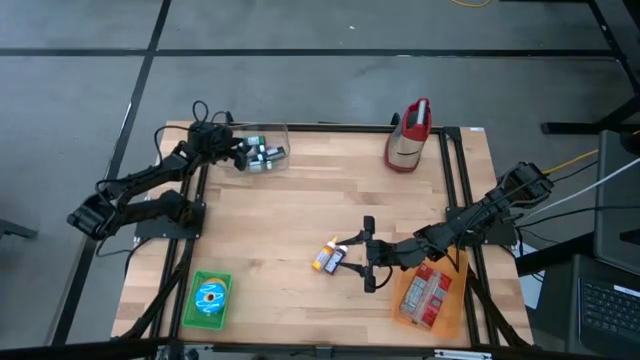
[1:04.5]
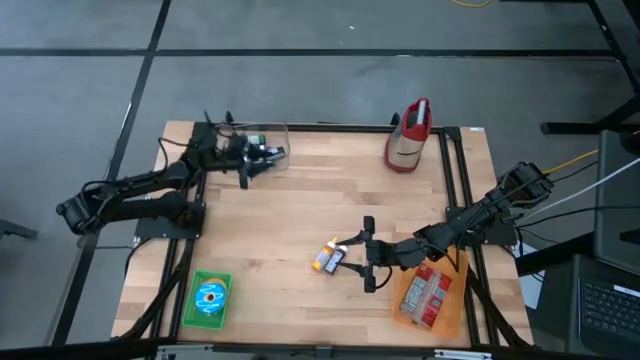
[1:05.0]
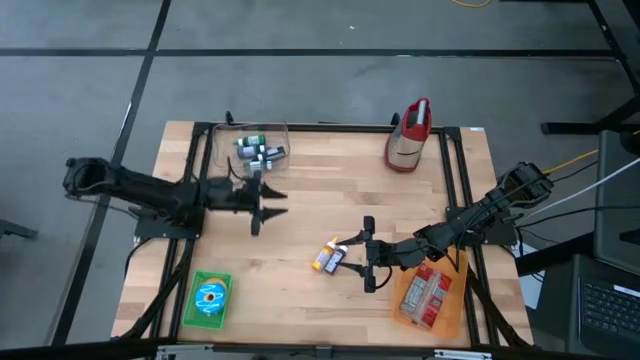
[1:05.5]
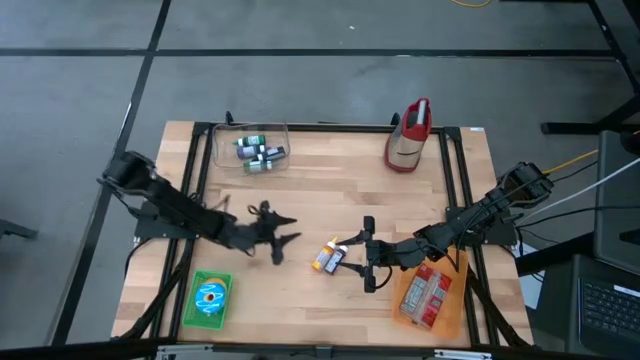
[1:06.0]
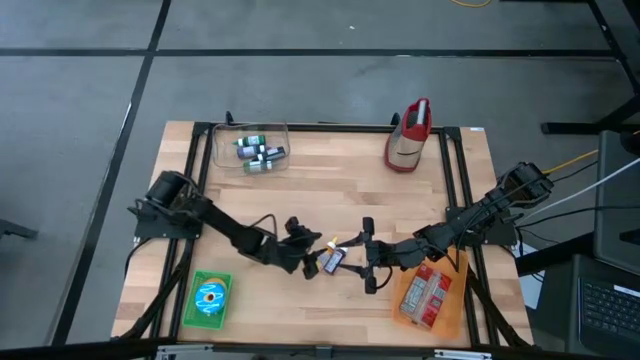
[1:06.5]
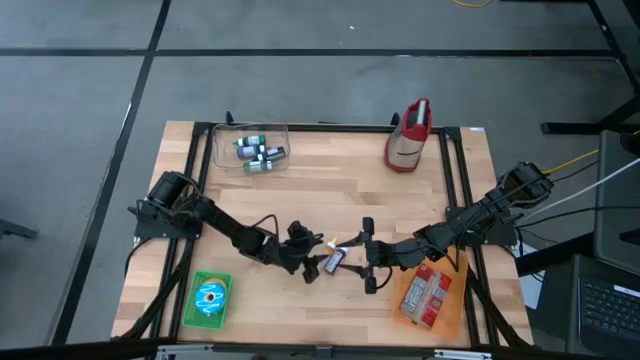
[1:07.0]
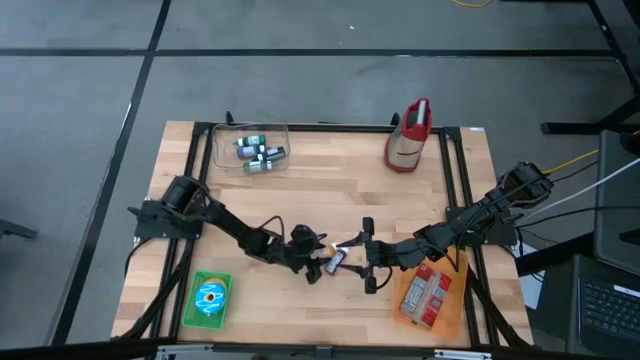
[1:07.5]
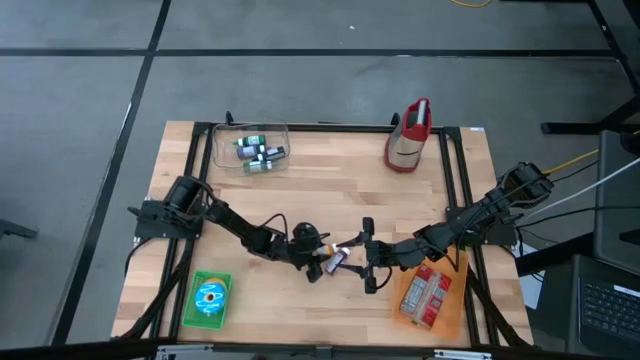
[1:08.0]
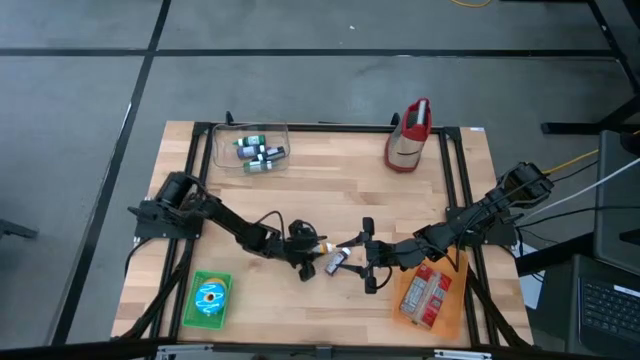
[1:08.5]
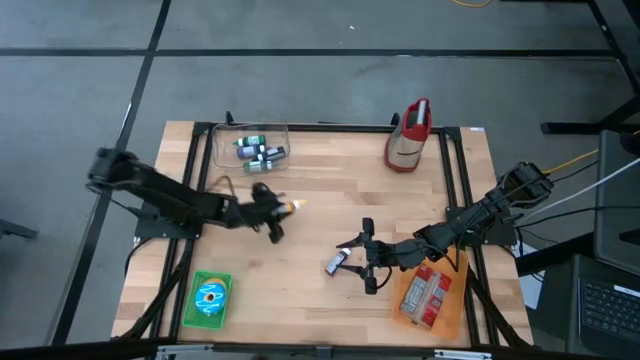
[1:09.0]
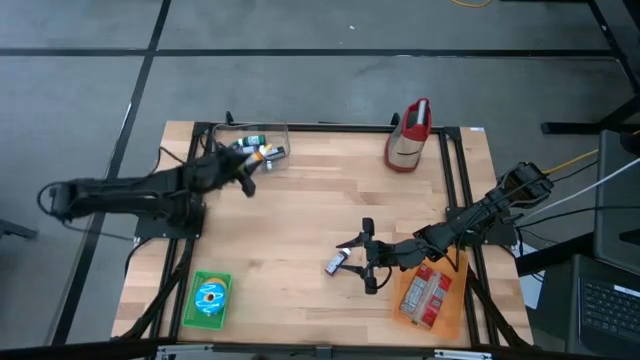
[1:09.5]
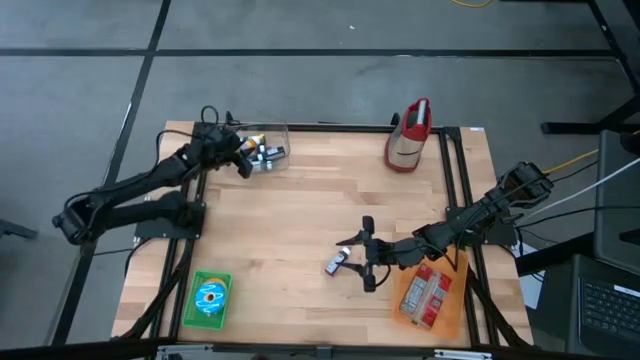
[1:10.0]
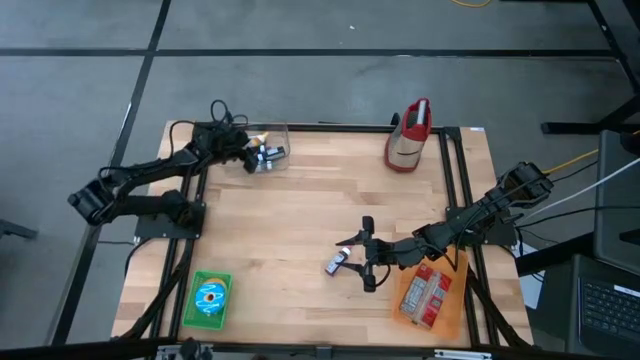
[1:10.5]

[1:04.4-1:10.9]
Put the yellow food coloring bottle into the white transparent bin

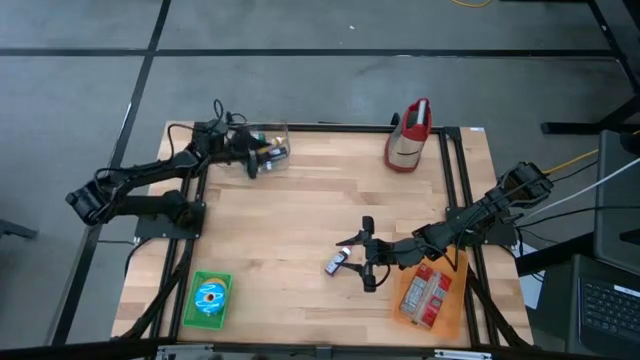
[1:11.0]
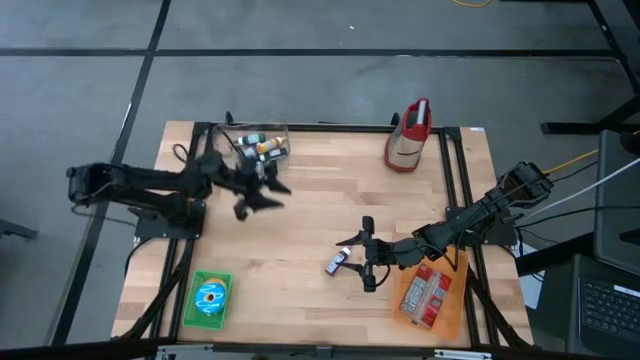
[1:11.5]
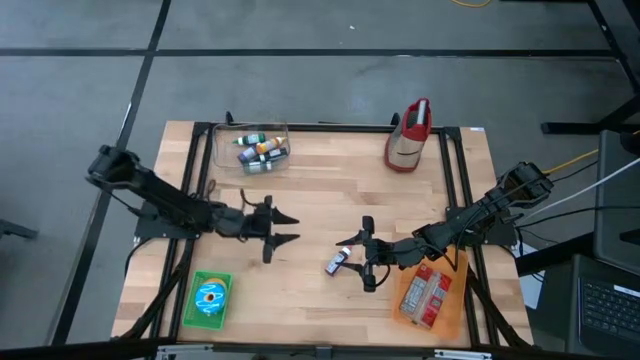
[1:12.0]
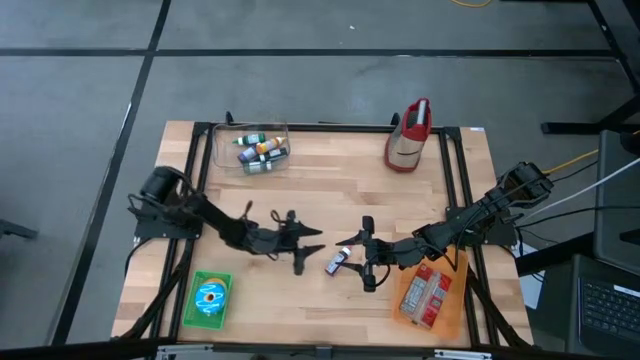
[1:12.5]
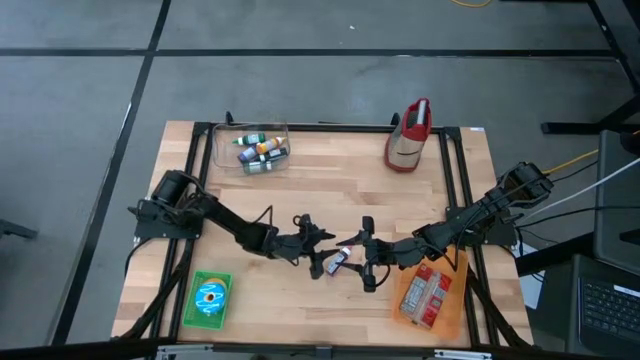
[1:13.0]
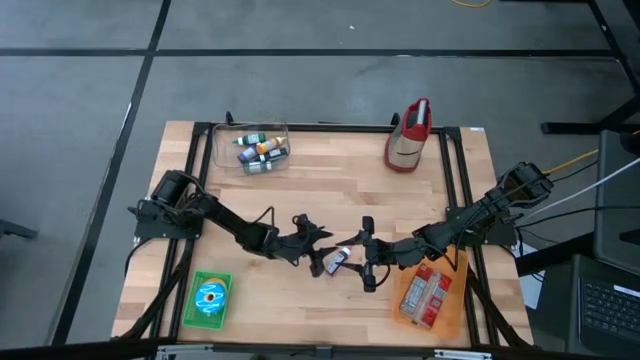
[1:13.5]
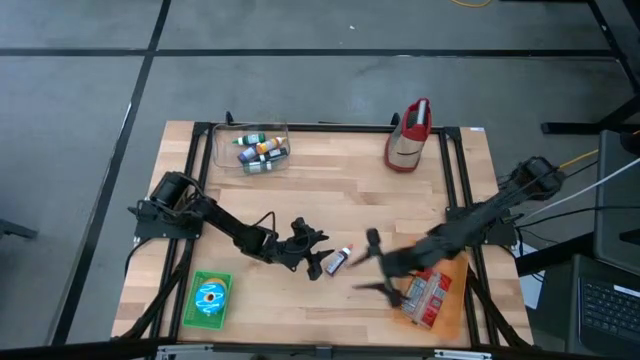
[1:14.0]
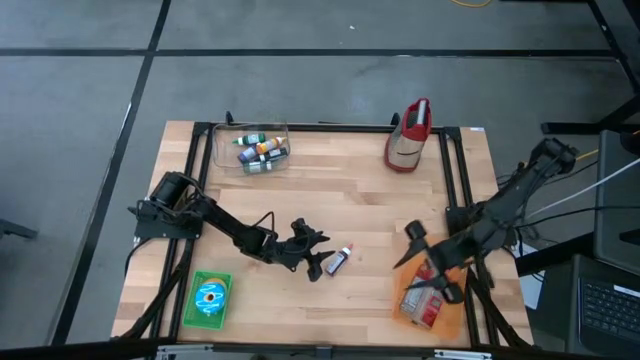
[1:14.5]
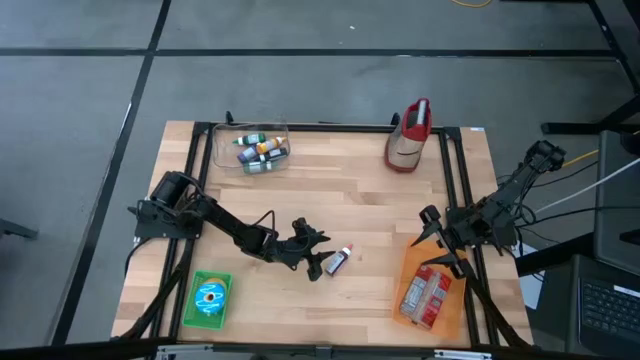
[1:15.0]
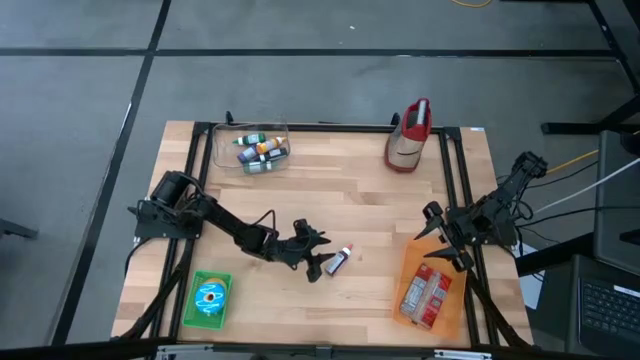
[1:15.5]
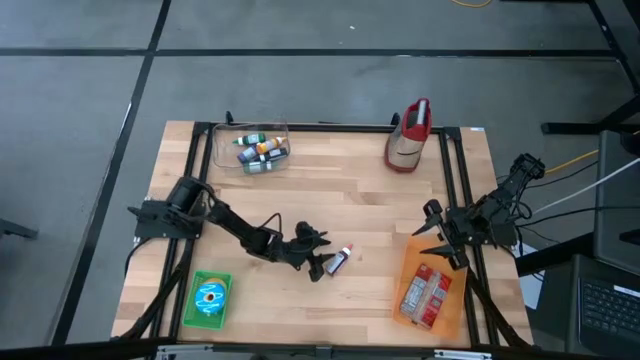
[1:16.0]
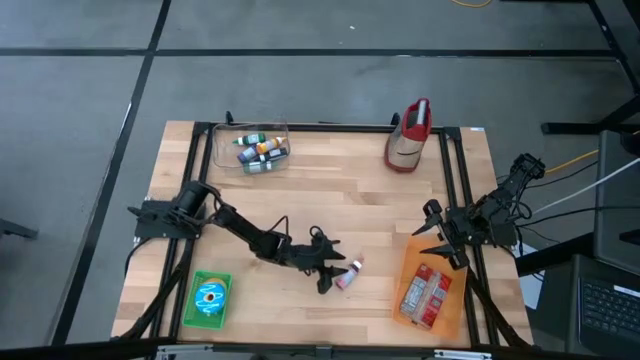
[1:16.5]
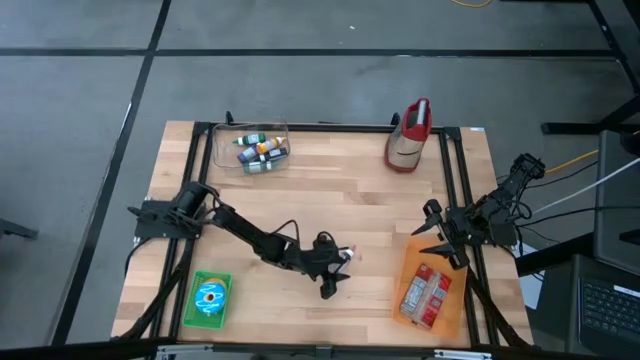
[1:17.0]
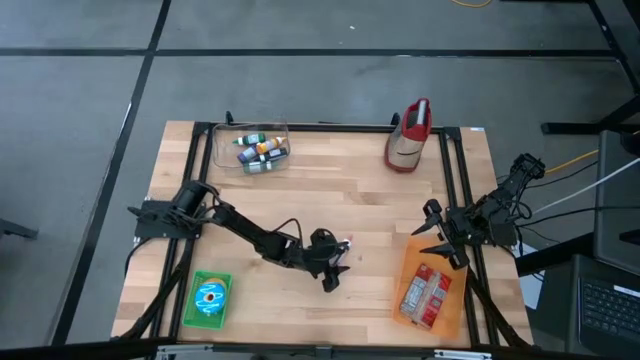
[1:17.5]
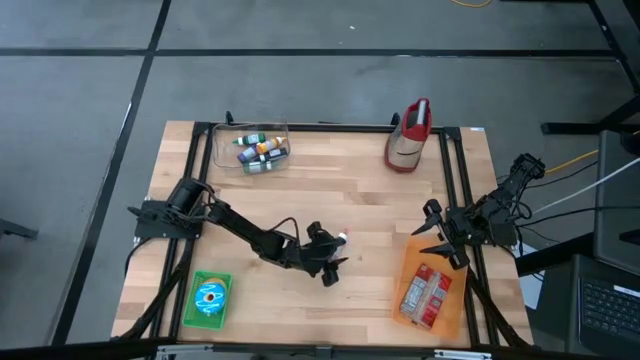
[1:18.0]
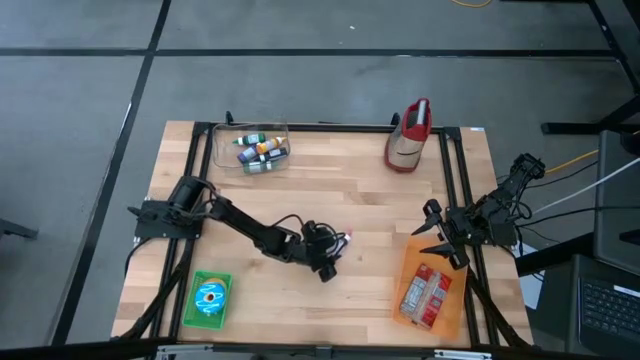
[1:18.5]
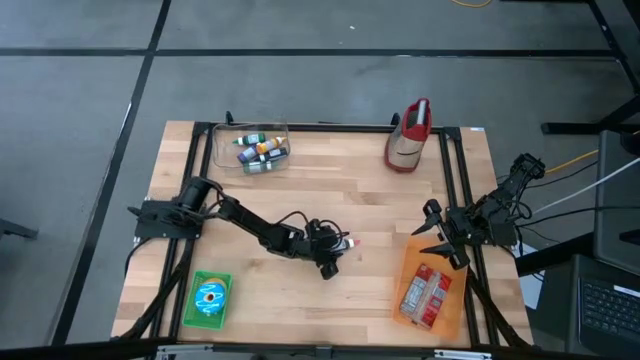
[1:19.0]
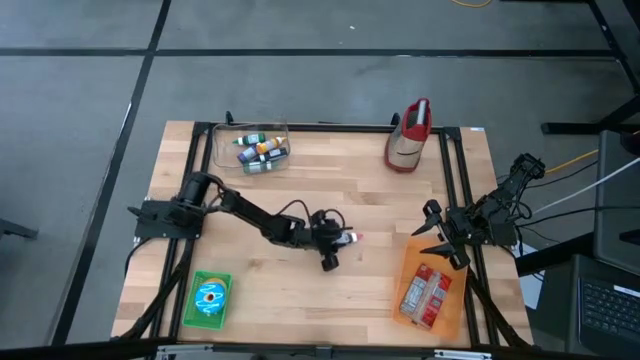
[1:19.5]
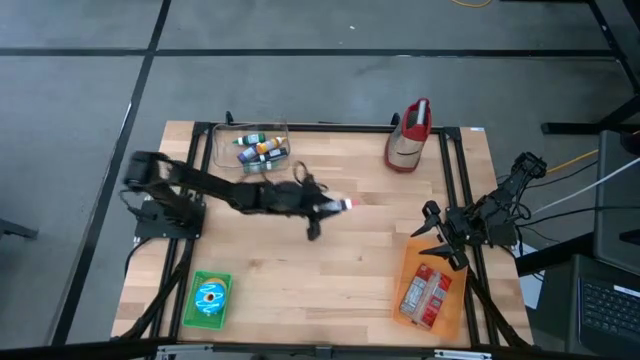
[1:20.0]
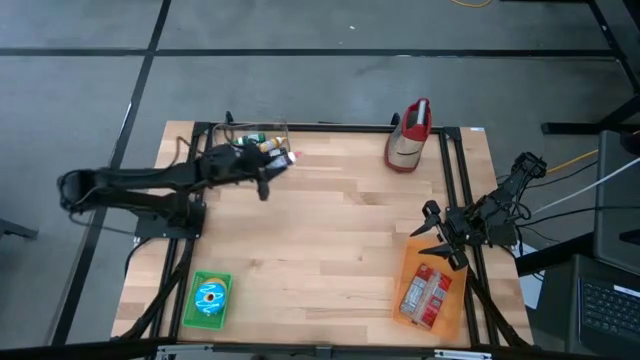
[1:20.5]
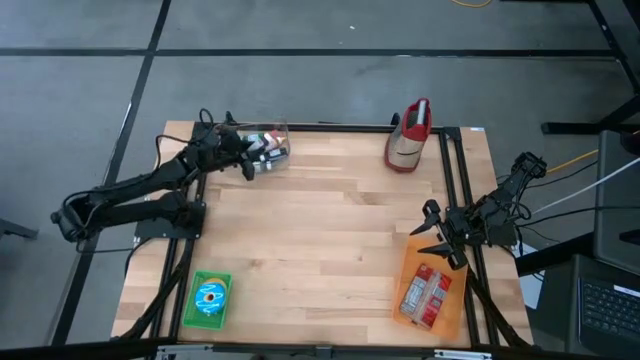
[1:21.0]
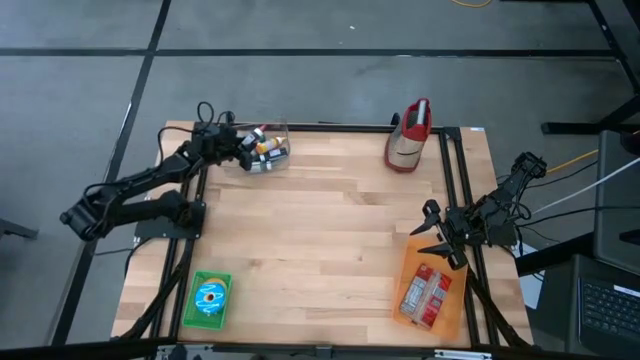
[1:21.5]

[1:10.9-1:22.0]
Put the pink food coloring bottle into the white transparent bin

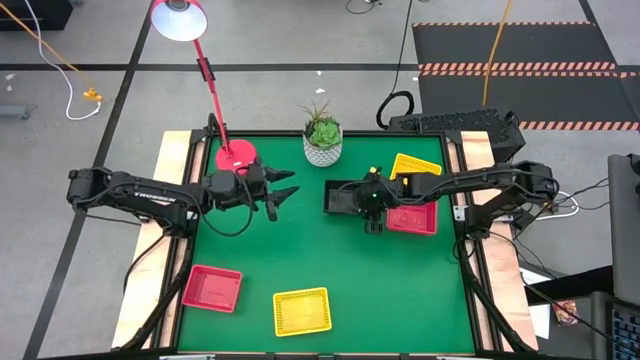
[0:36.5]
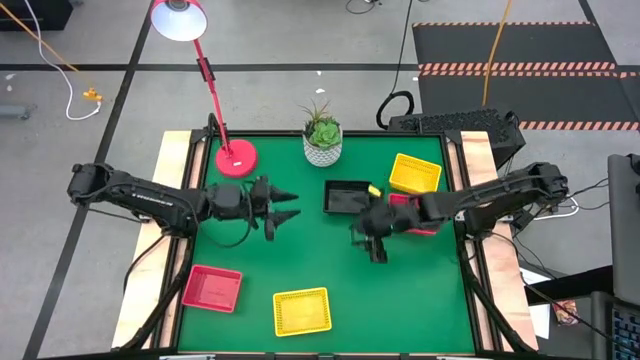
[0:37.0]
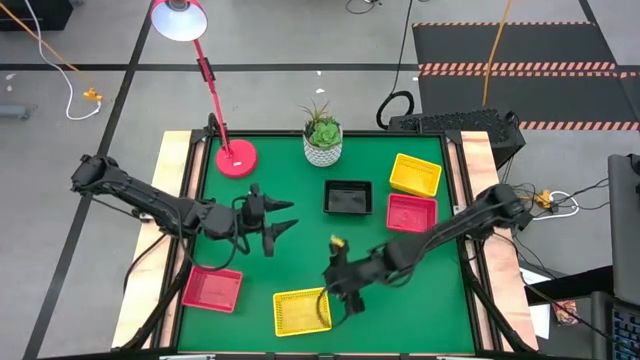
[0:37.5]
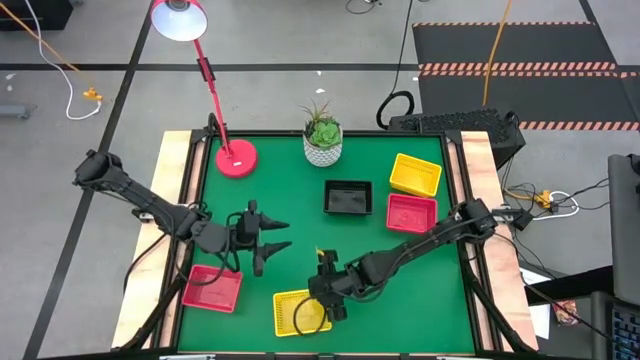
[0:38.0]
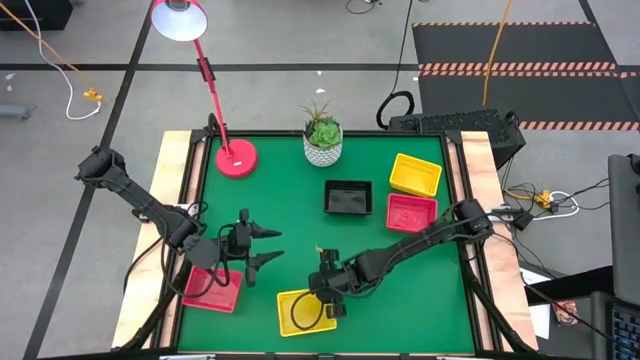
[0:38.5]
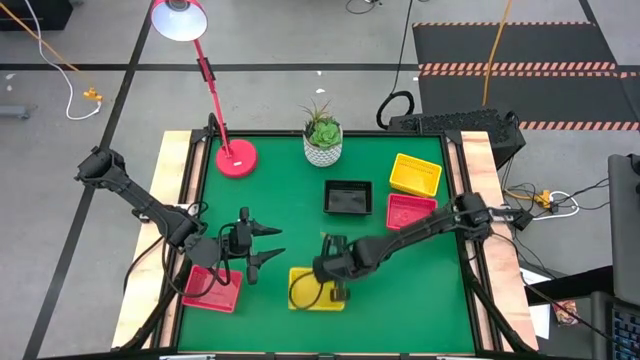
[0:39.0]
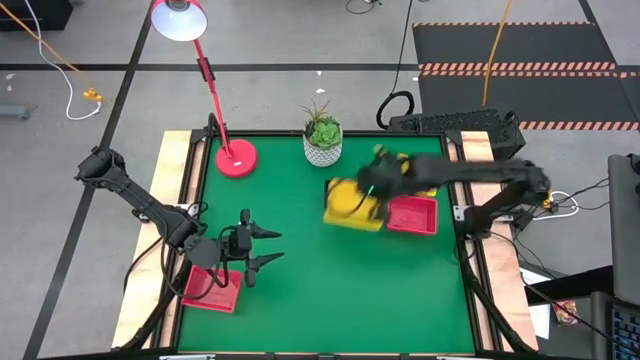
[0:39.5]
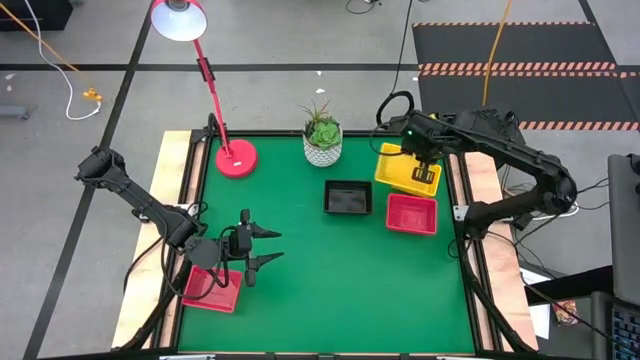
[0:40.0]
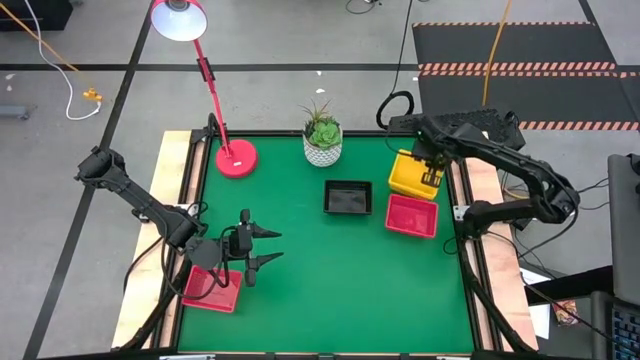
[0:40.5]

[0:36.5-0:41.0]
Stack the yellow bin on top of the stacked yellow bins
